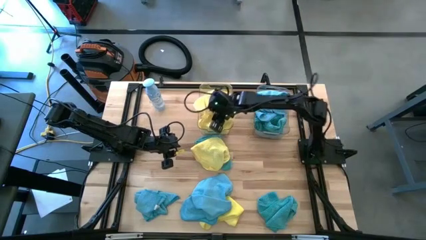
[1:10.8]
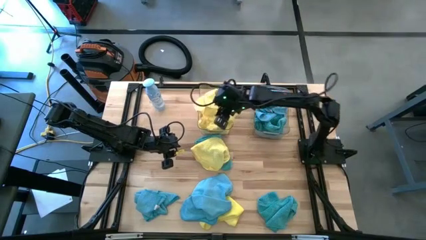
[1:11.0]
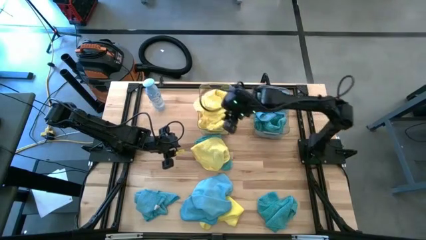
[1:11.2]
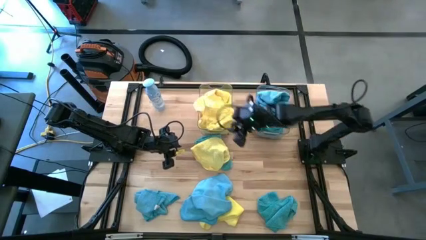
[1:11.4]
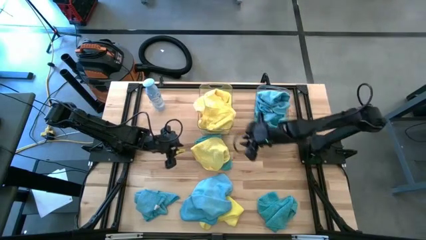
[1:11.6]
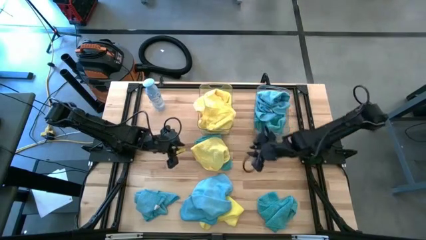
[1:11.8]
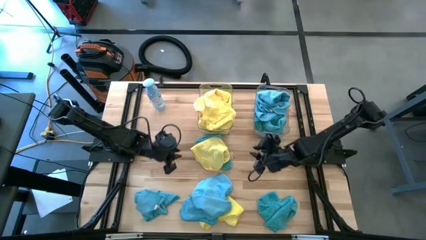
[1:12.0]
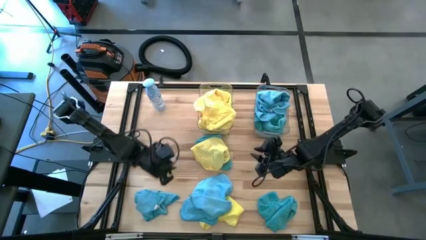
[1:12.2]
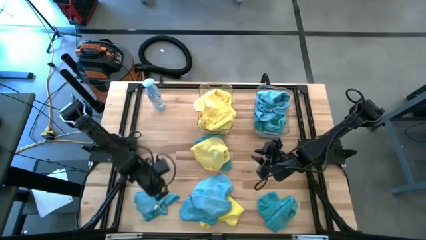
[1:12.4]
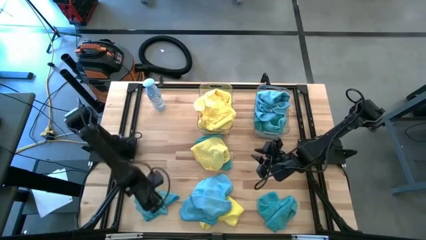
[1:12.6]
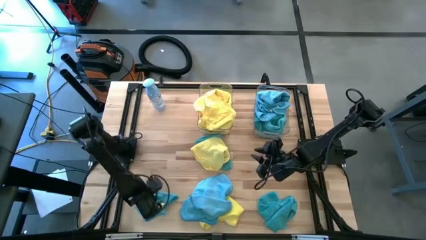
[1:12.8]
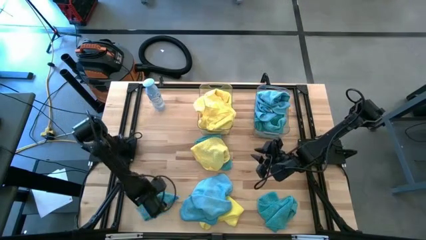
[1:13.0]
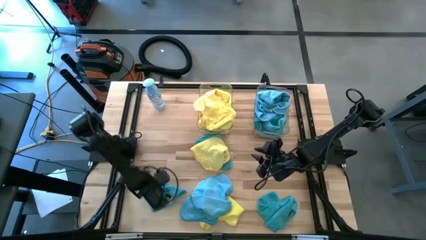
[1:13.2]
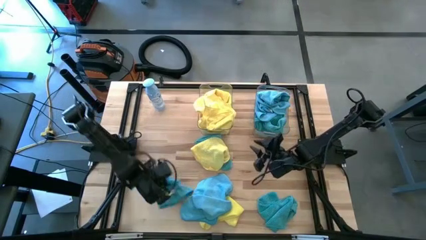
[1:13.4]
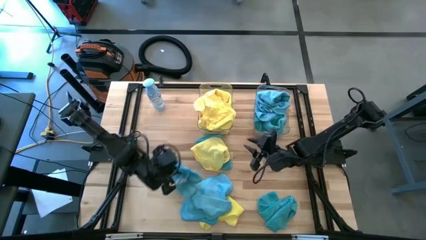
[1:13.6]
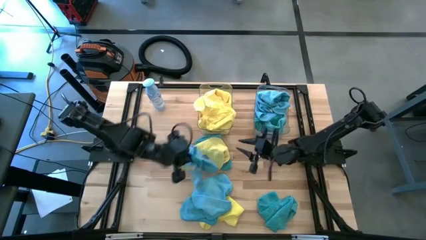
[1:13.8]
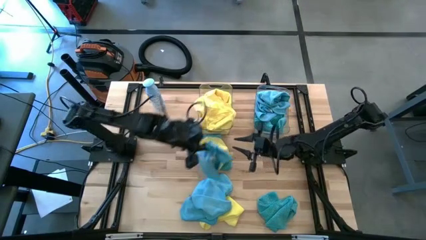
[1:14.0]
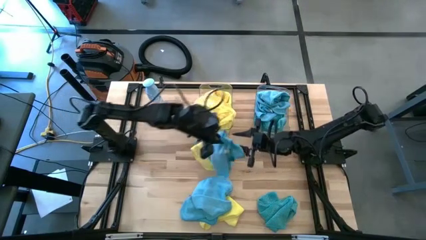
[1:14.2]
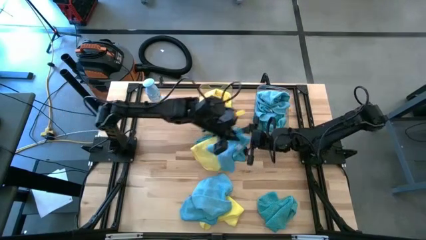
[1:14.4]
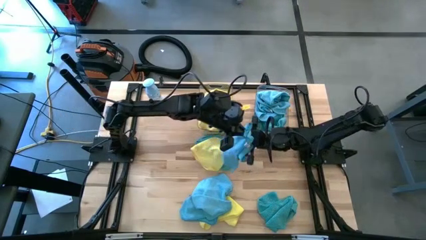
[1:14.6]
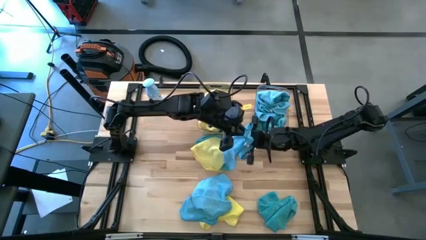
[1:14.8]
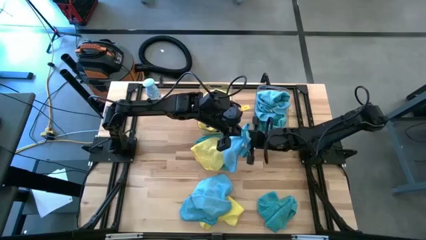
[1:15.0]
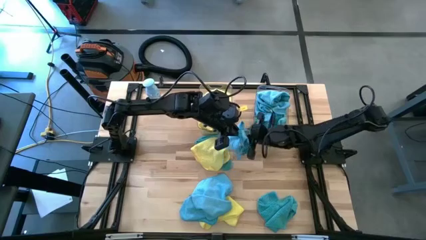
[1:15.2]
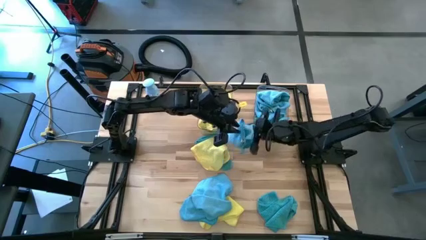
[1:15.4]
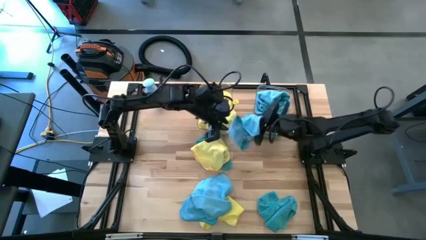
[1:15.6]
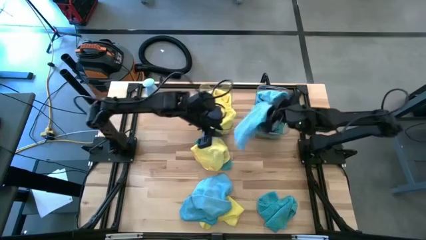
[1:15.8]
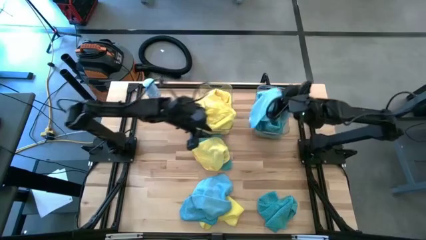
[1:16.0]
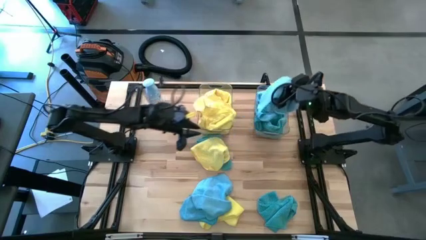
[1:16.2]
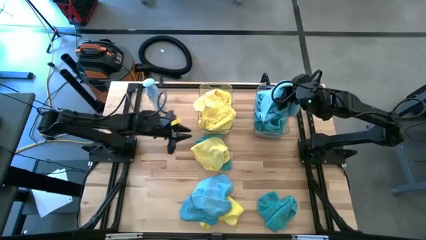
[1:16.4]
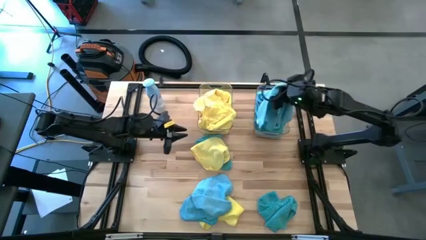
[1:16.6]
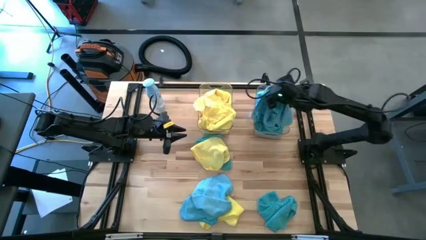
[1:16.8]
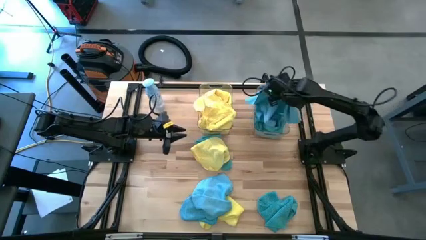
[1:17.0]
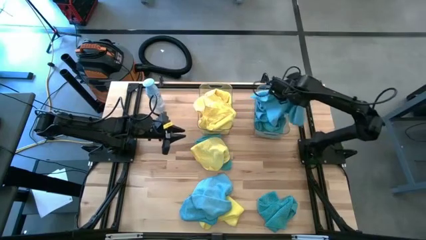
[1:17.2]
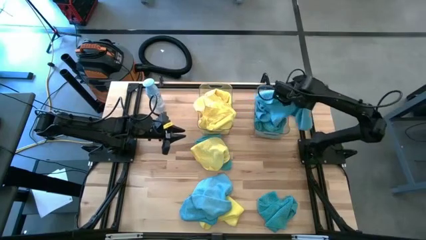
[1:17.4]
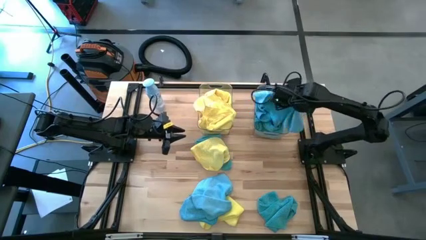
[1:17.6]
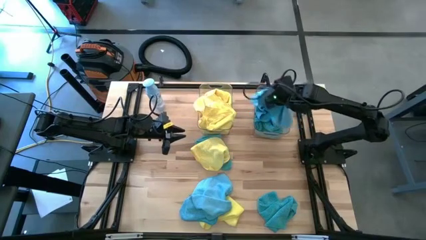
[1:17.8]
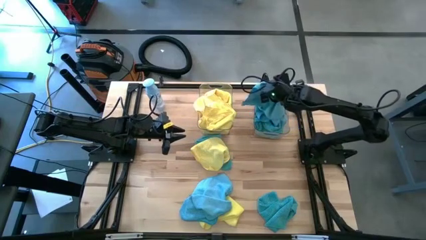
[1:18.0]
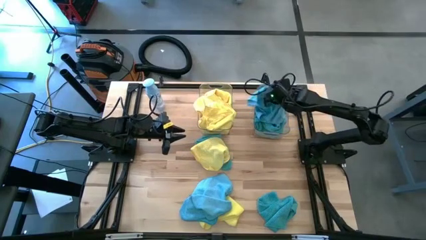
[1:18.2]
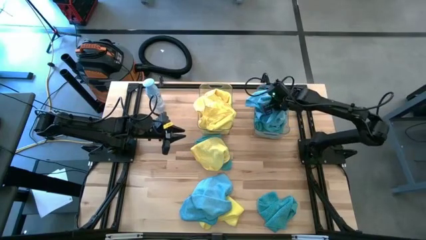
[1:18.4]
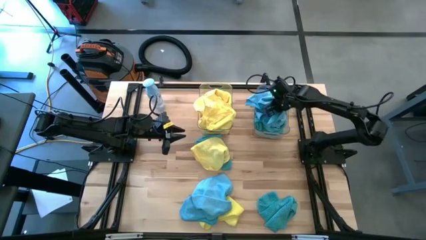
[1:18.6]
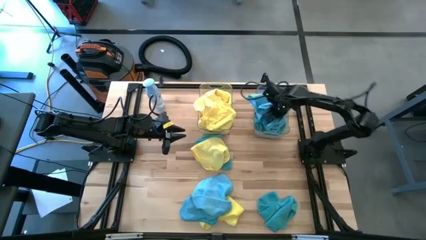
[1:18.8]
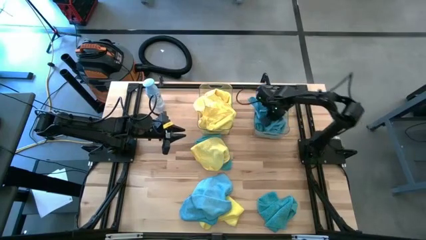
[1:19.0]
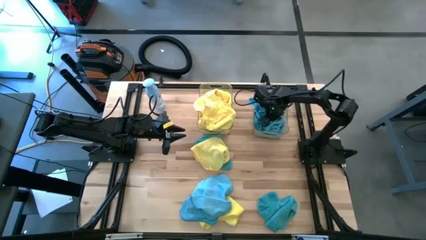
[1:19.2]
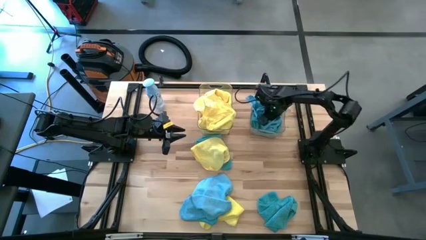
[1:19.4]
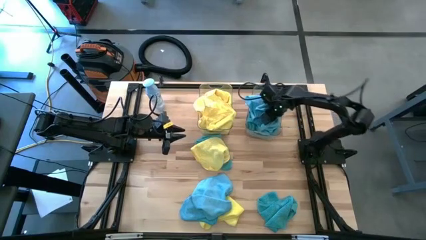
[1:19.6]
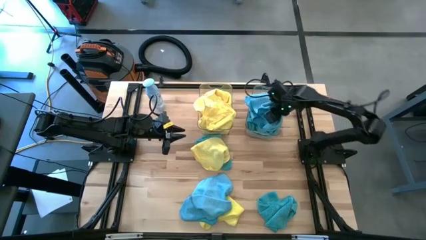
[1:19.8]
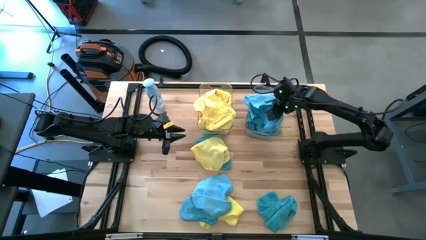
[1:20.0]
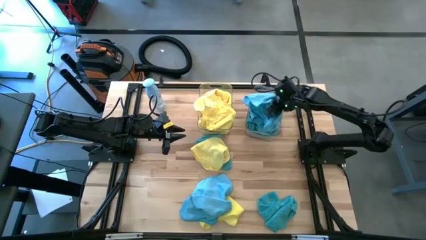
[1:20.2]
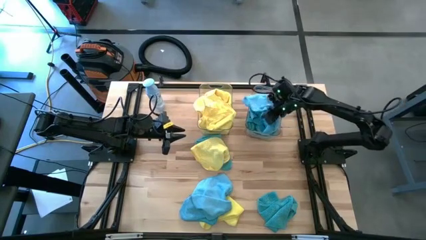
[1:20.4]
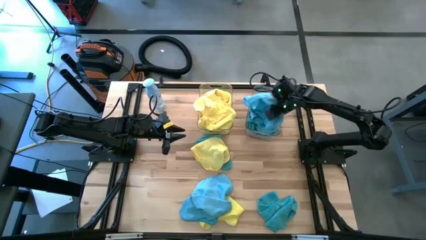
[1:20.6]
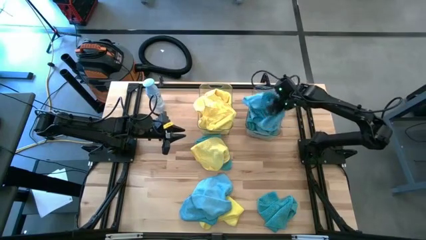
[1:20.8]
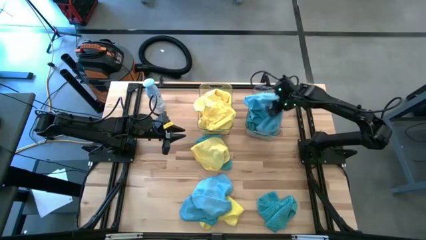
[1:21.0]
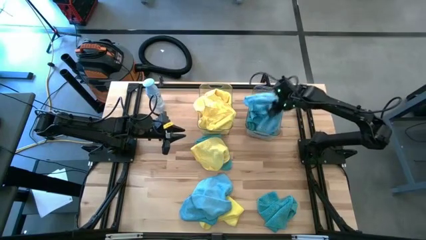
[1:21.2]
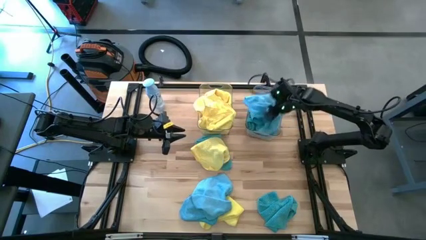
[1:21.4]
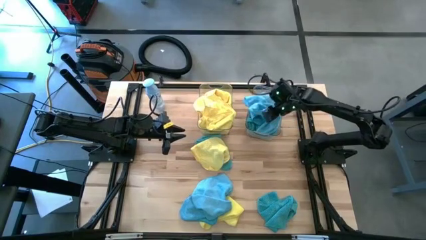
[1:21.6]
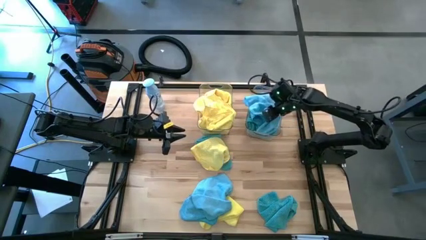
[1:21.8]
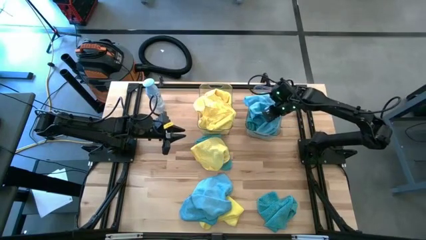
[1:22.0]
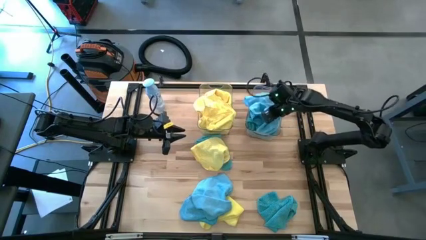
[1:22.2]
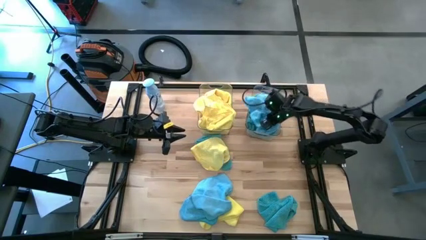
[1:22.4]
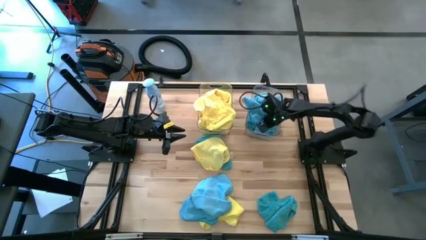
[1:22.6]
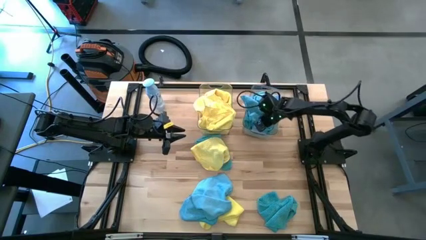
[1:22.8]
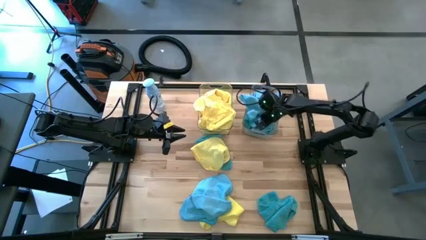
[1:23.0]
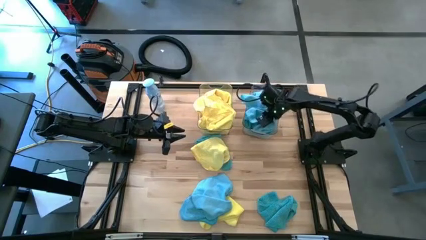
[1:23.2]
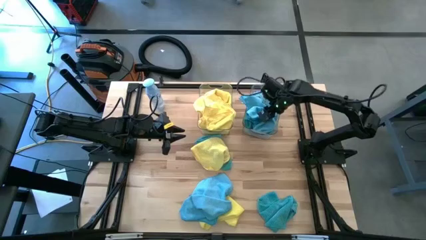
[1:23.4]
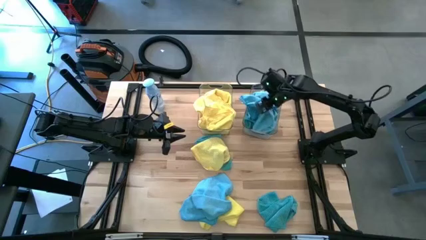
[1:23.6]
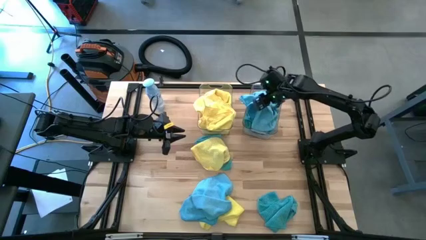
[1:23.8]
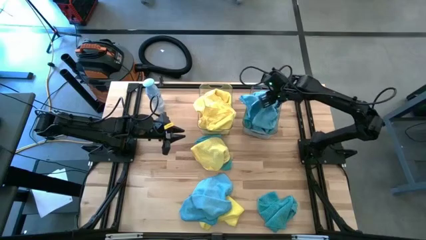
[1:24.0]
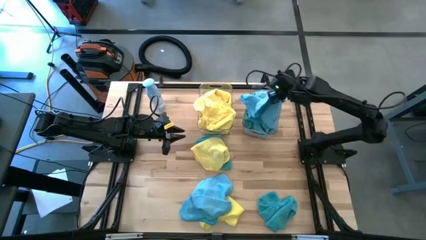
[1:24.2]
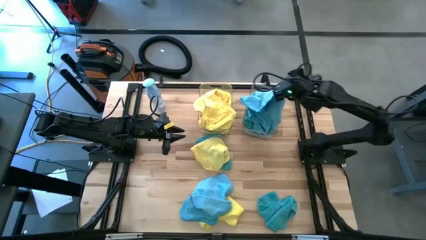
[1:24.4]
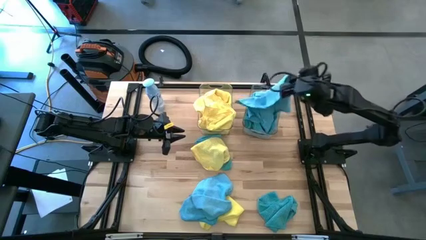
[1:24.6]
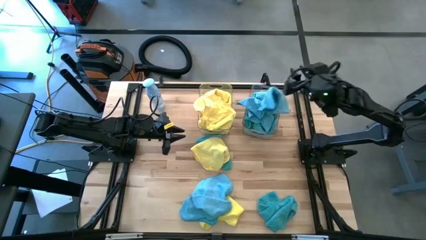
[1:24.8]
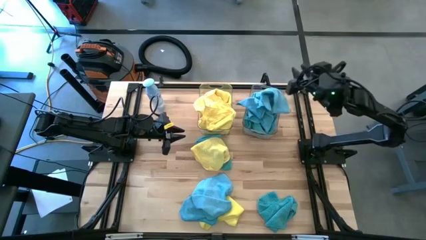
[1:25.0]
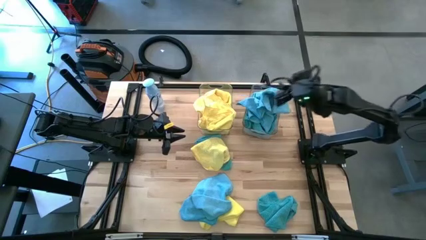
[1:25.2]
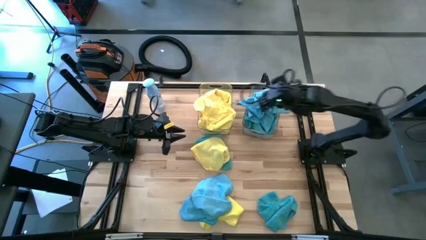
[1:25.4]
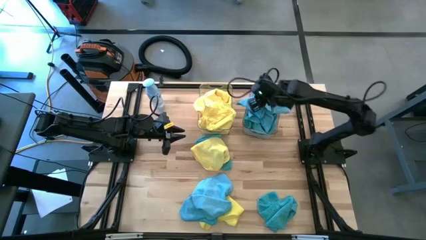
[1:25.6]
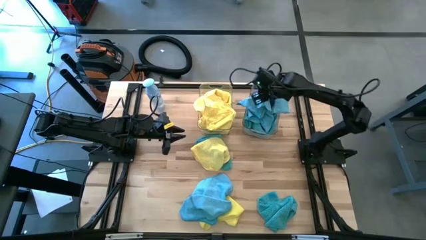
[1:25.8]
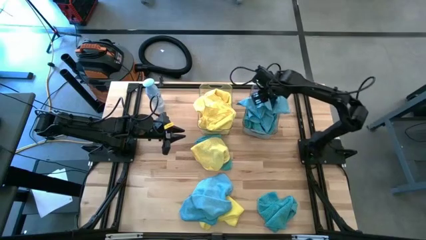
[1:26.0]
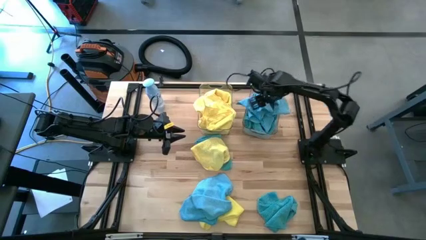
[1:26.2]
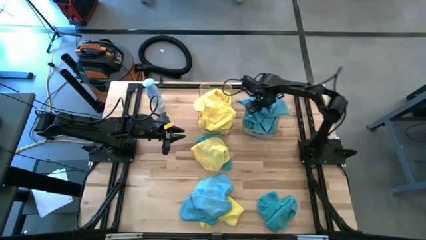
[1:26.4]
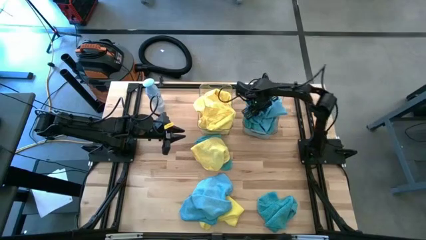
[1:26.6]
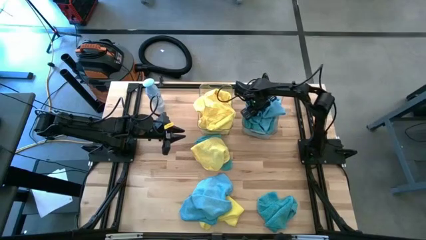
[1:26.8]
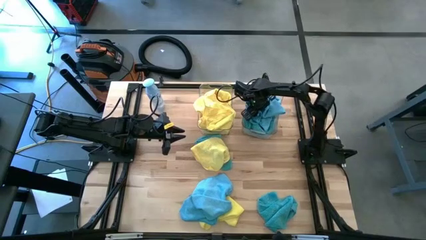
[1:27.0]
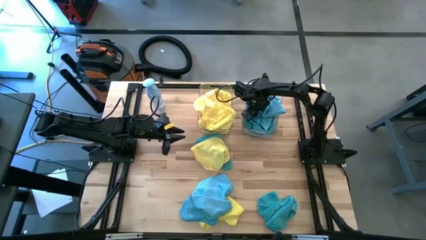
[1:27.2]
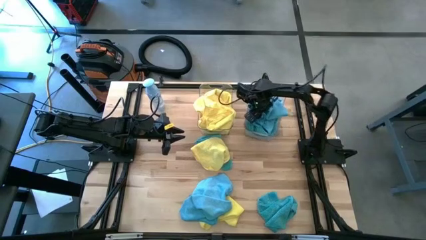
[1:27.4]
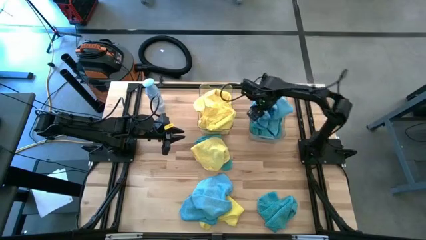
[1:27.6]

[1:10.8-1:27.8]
Task: Sort microfiber towel by color & place in baskets
Put the blue towel into the right transparent bin
